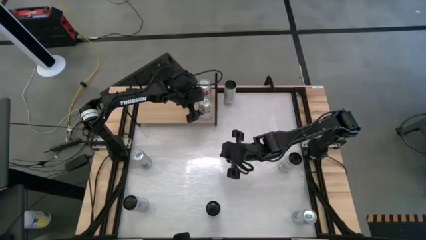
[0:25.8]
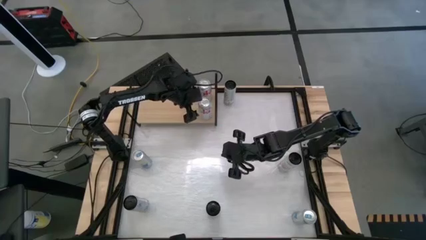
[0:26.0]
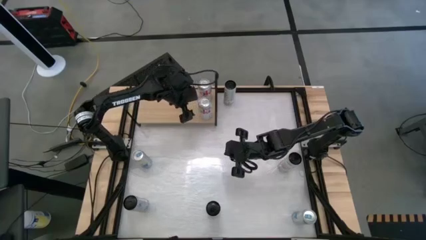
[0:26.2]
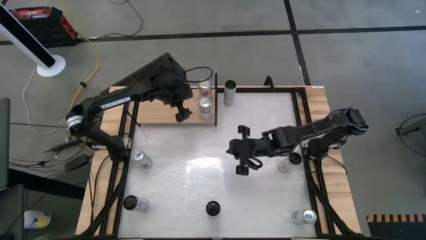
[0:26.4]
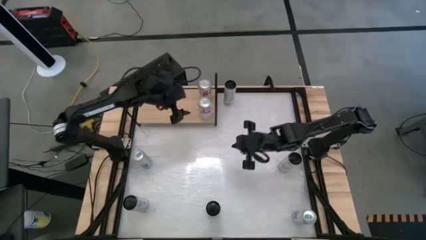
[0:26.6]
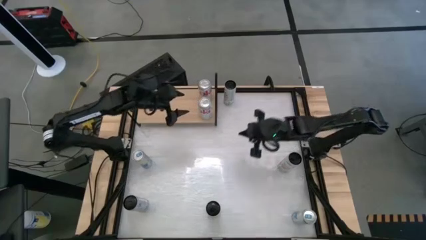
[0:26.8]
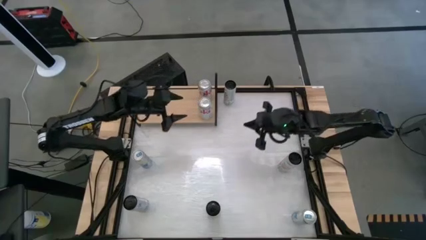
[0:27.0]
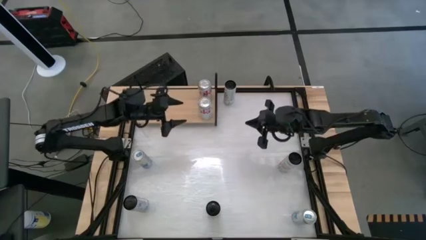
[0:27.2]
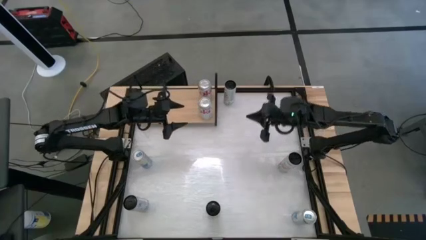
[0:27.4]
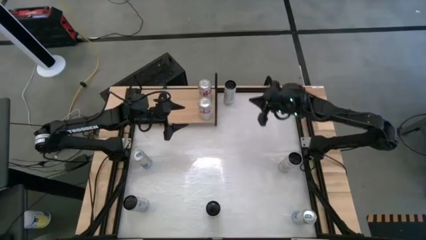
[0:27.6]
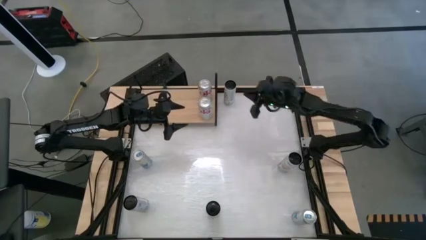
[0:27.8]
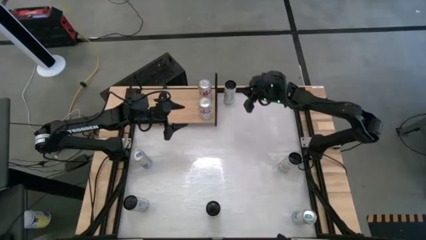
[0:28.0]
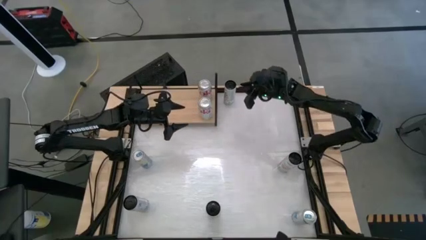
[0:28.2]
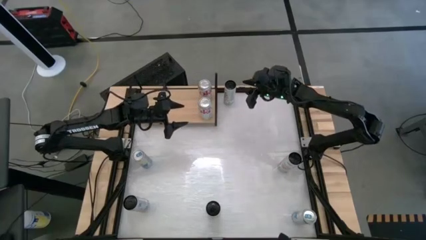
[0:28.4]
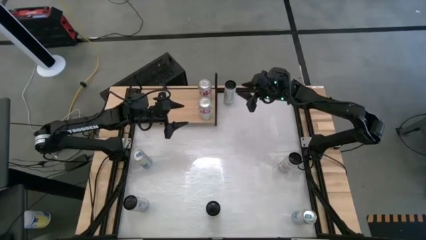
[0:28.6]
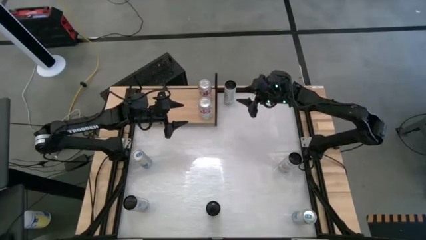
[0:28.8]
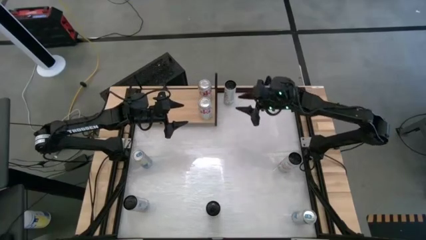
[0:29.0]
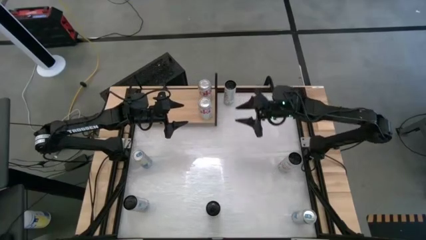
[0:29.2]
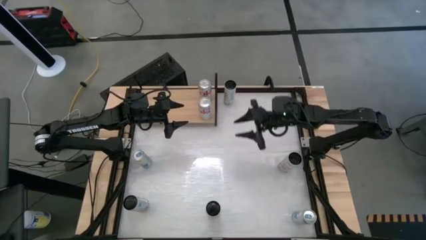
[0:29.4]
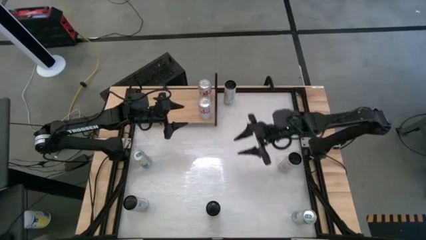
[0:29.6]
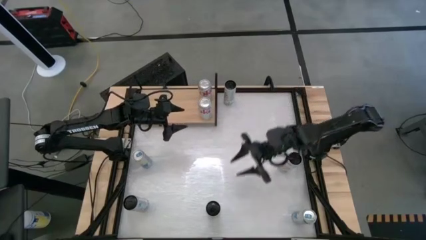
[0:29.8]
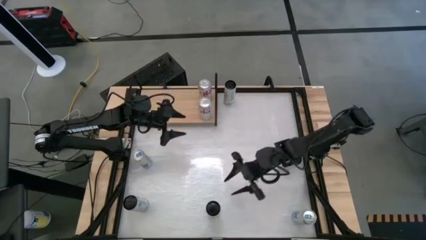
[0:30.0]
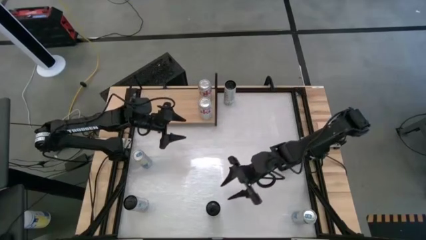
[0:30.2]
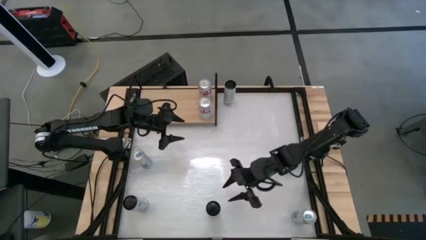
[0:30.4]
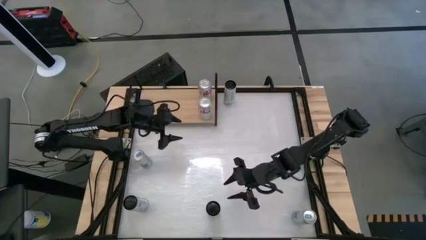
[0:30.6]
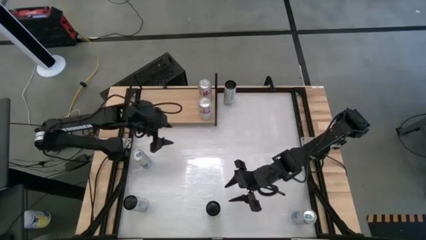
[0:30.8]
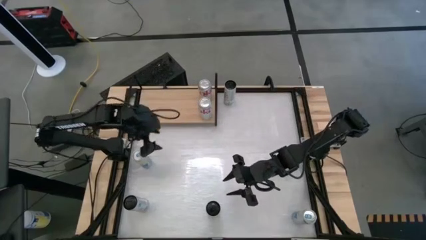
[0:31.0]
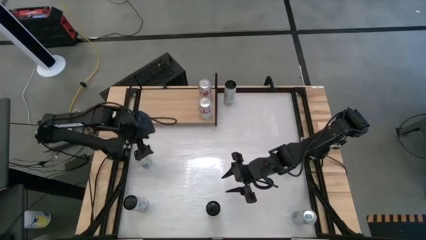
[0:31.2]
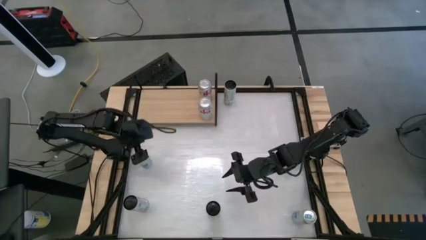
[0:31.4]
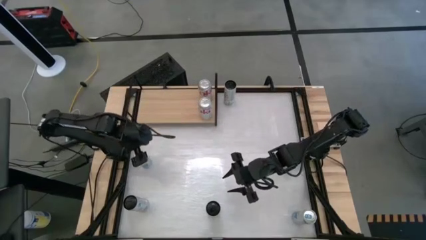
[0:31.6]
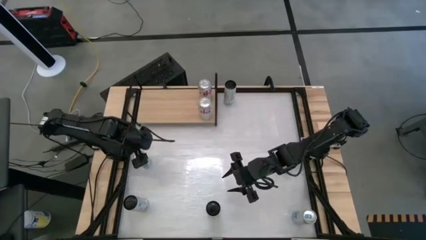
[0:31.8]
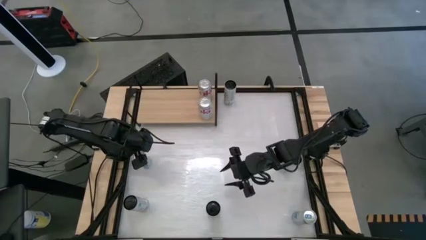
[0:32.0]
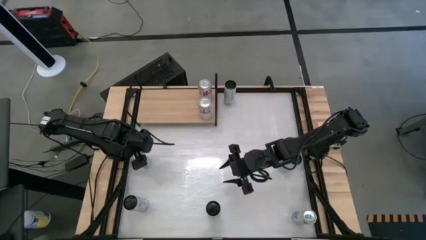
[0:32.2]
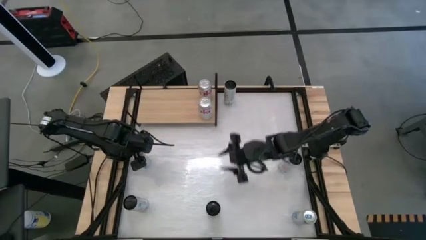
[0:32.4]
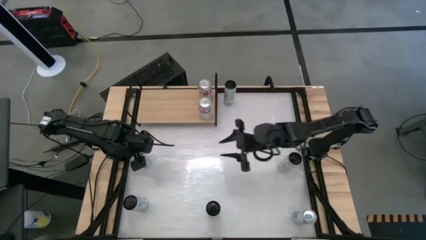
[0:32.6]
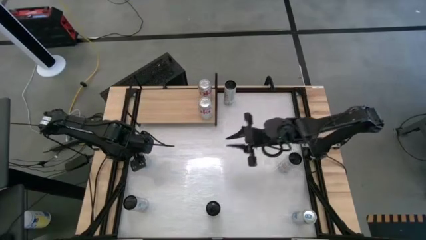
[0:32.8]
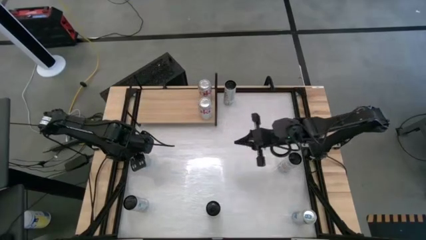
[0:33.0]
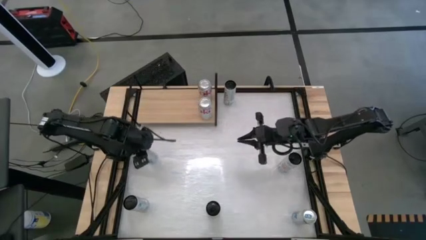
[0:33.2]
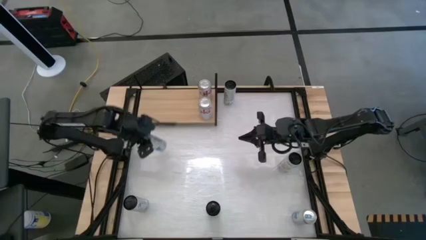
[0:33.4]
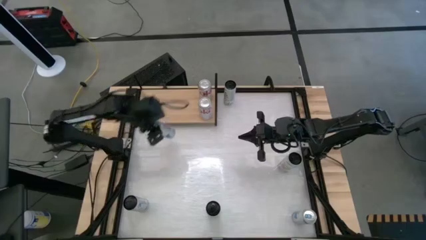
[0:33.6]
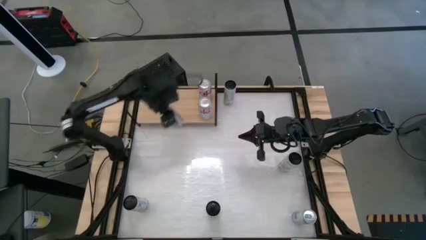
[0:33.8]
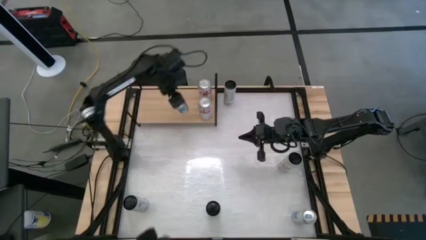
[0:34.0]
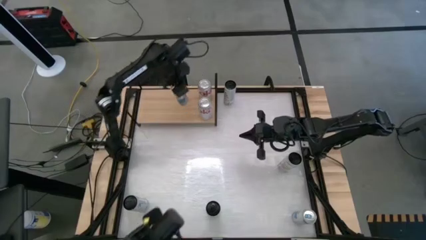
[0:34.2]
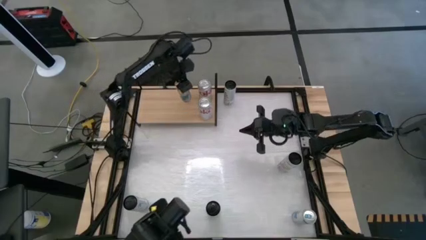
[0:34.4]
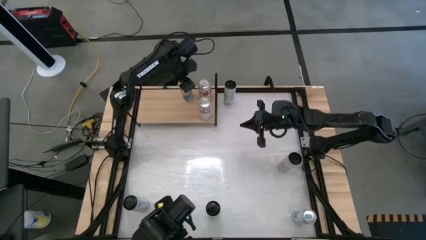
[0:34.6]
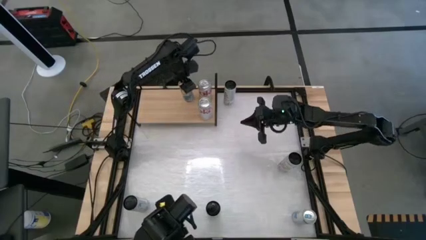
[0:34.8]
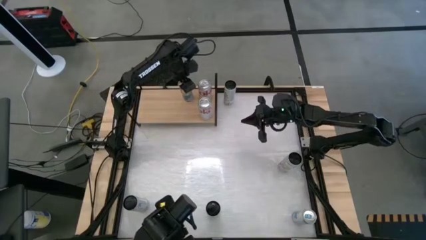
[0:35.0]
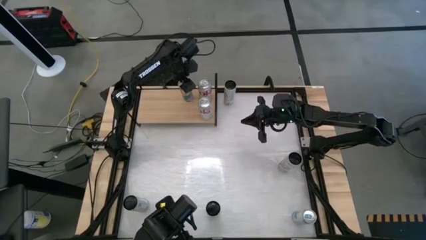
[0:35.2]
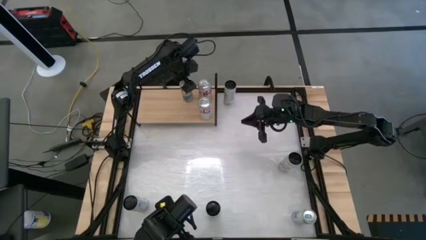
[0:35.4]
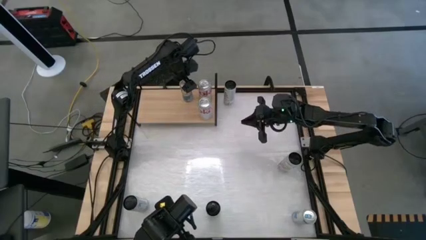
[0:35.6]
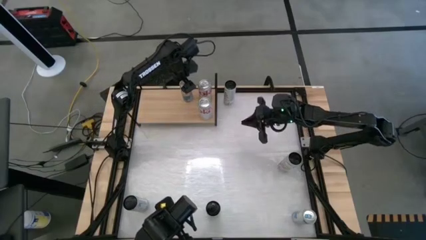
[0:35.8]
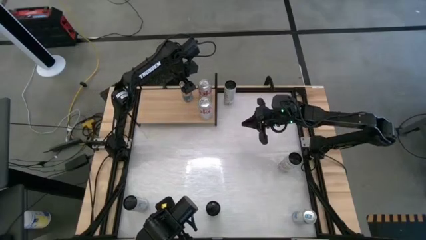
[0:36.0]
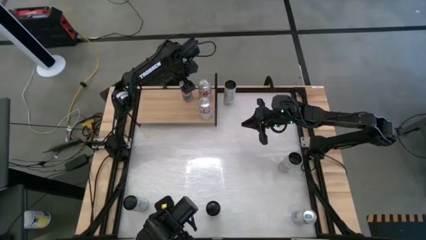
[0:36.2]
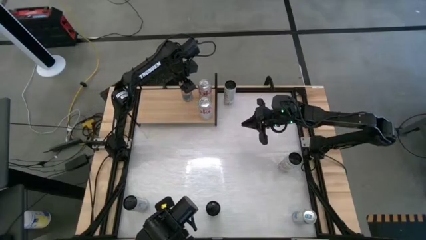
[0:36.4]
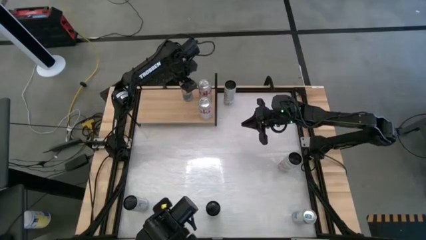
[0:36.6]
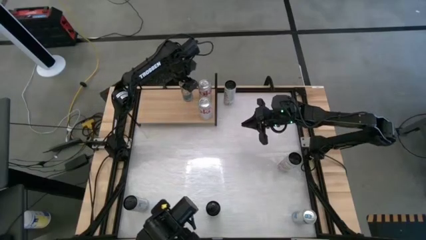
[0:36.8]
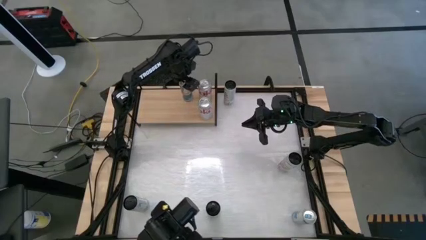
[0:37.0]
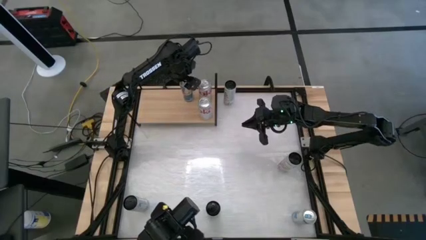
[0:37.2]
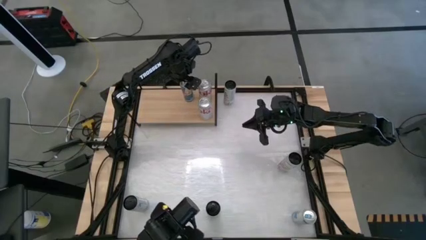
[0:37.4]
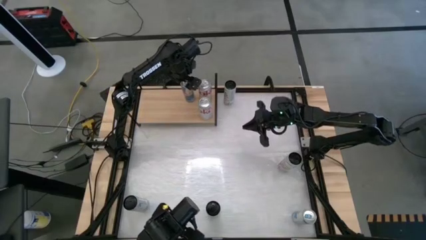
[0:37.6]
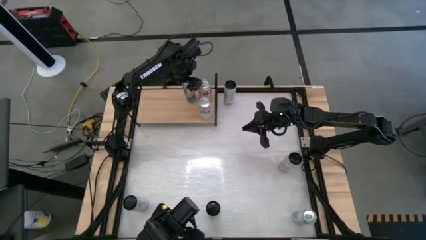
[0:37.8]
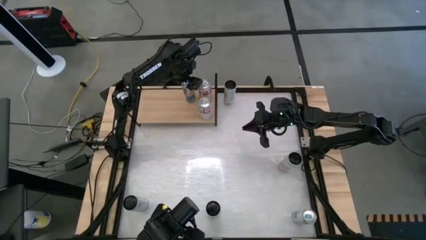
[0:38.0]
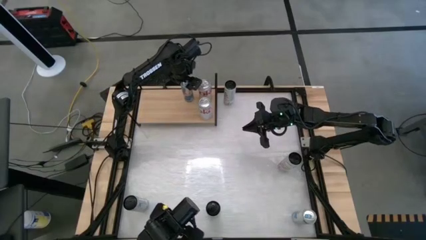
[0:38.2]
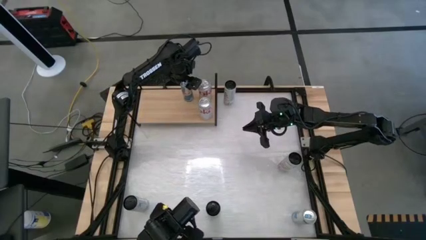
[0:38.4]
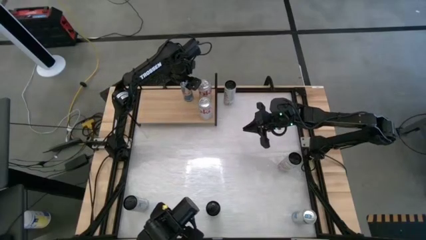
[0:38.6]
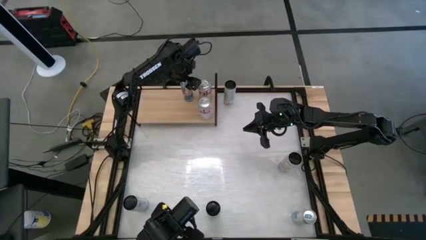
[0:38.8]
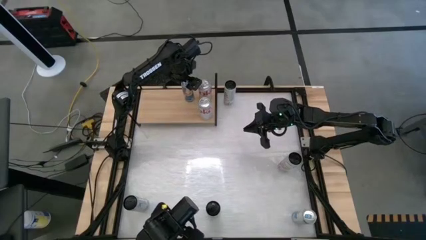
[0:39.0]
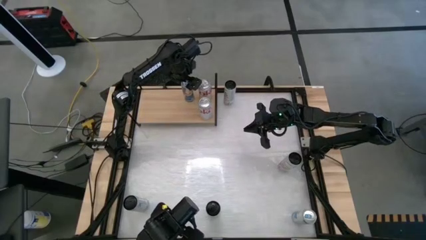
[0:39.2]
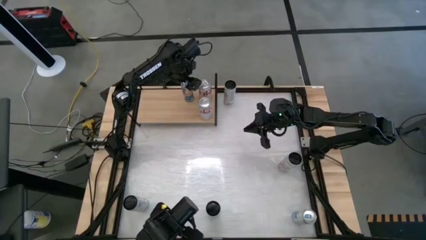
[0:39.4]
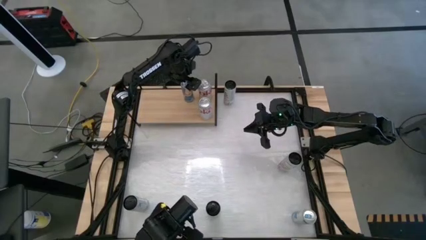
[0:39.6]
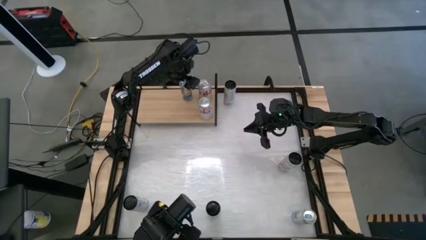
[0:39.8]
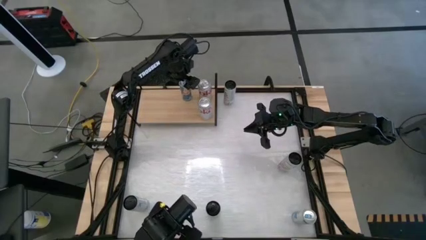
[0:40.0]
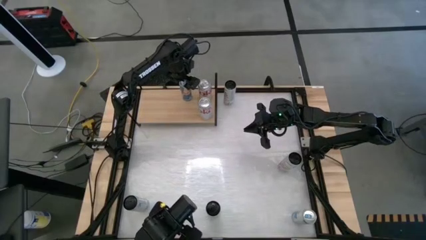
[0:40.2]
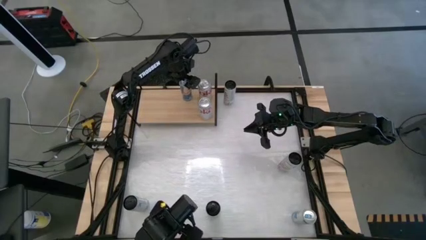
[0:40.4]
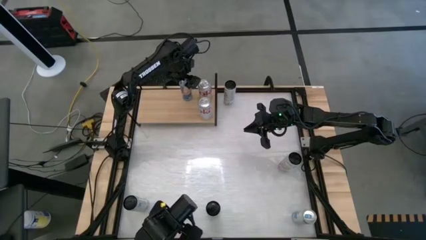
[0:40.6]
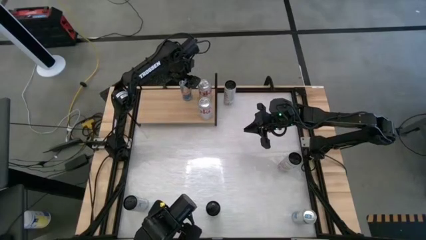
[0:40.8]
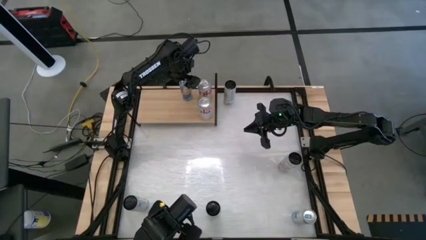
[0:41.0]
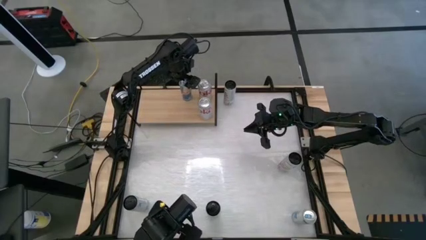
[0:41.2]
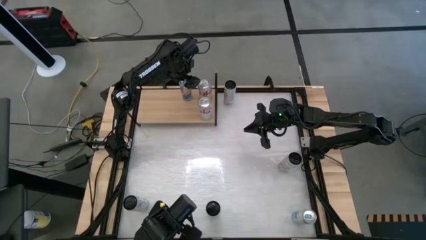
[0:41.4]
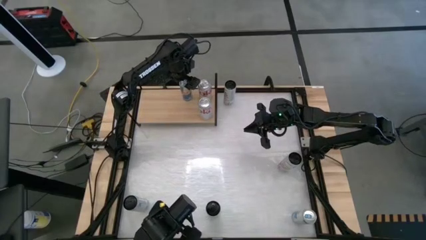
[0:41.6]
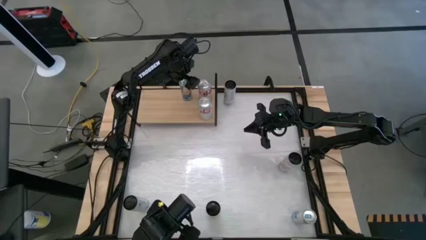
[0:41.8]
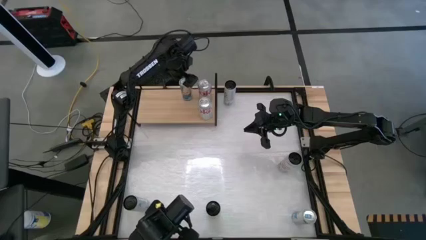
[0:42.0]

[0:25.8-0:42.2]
Task: Place canned beverage on shelf
Put the top blue soda can on the shelf
